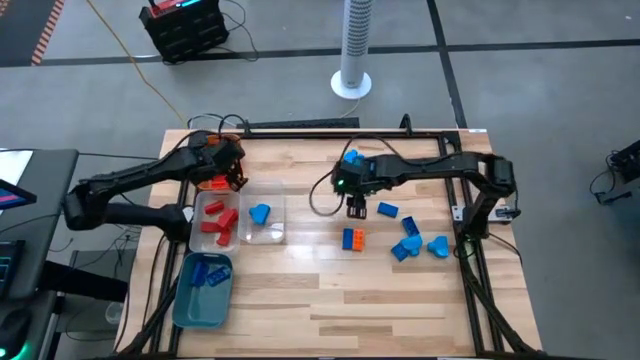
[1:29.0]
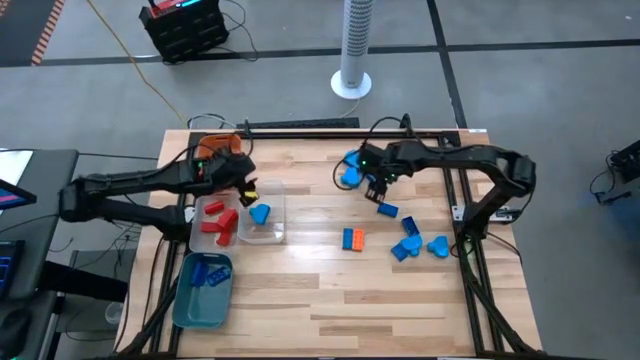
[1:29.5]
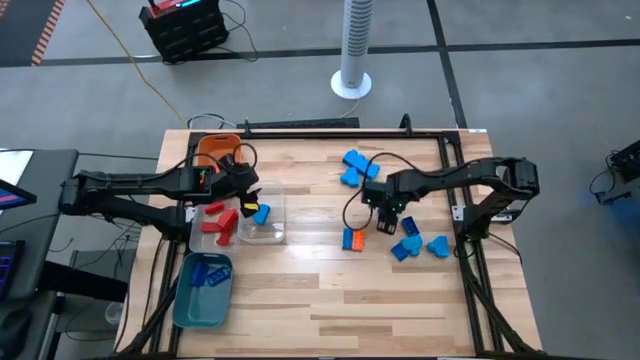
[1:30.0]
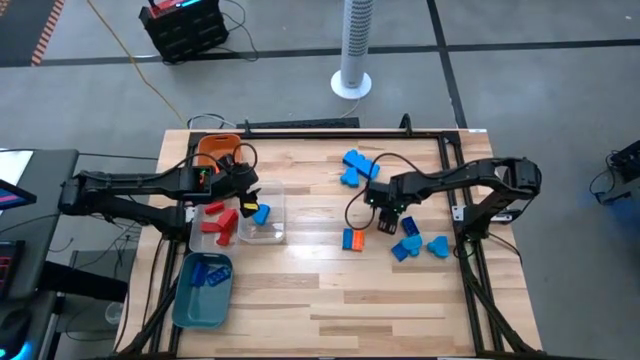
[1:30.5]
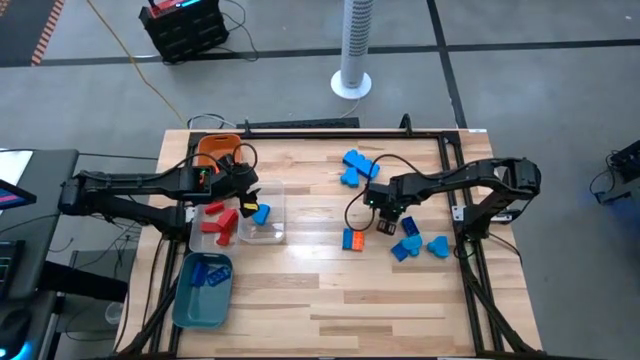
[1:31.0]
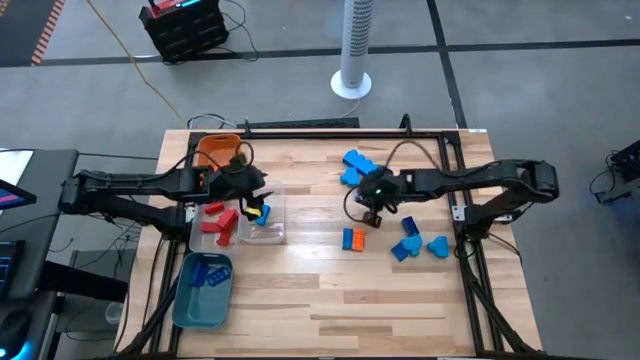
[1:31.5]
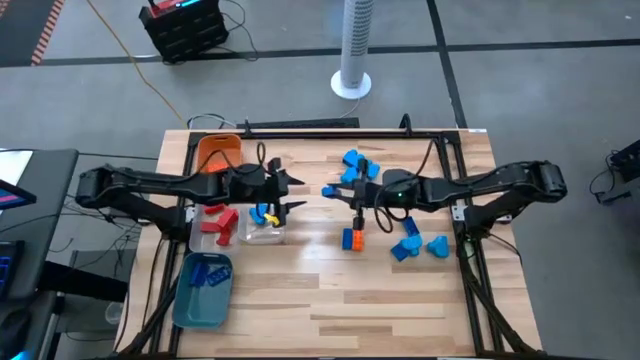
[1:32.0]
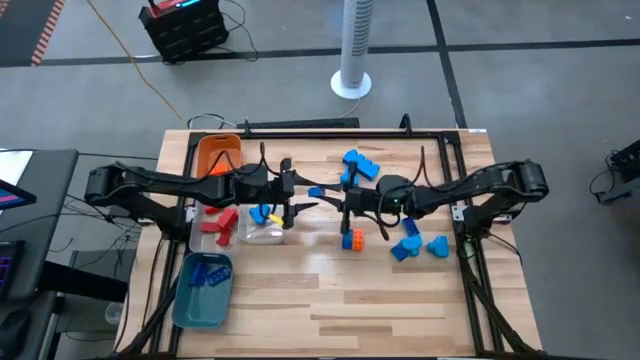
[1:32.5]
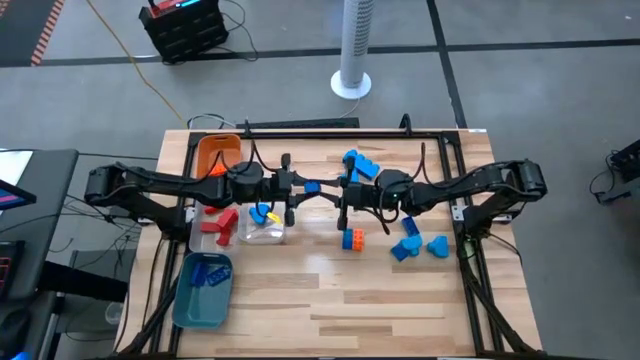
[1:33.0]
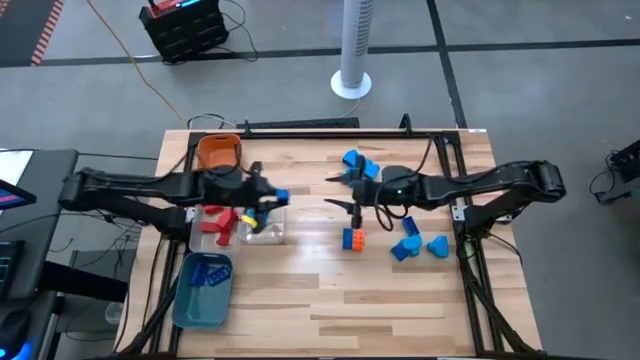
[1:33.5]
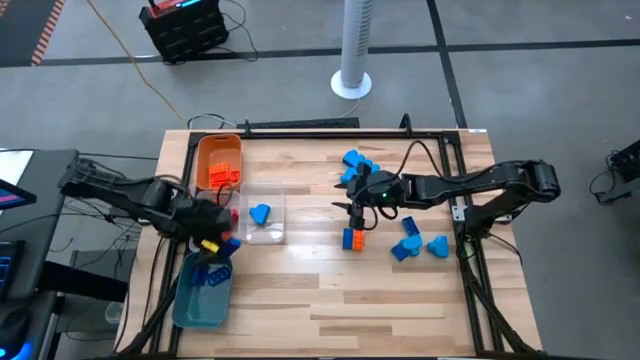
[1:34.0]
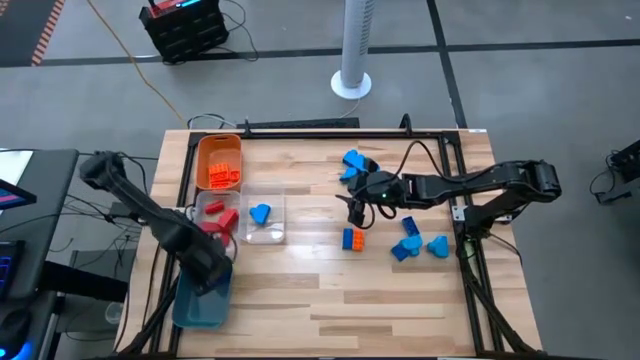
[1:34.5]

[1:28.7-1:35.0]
Task: Sort blocks
Put the blue game piece into the blue bin

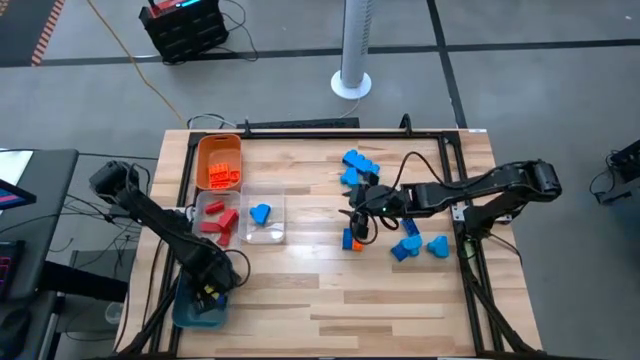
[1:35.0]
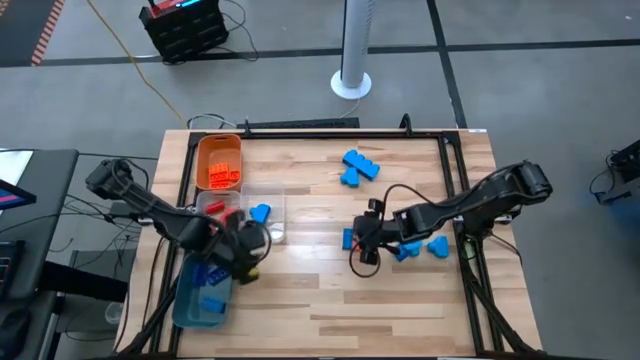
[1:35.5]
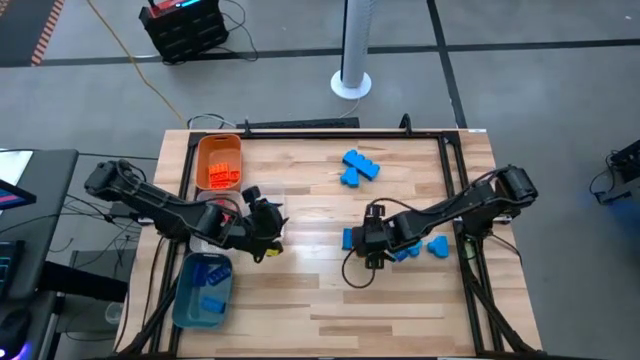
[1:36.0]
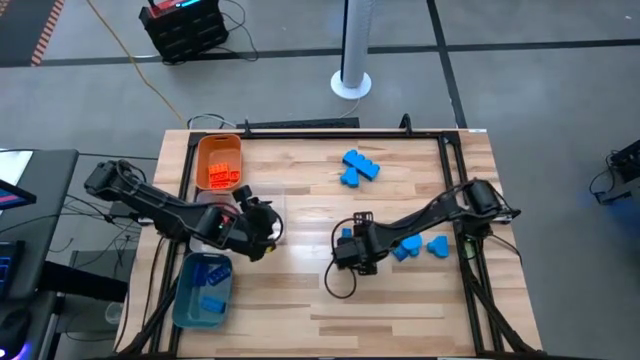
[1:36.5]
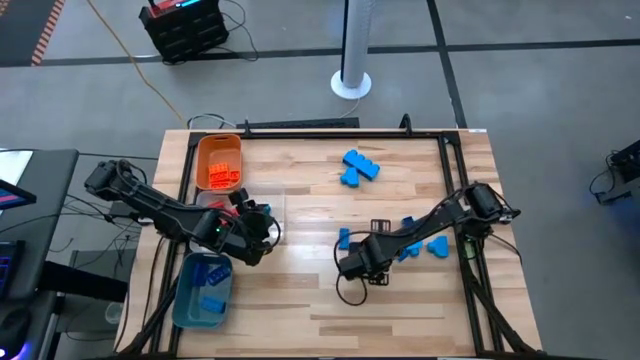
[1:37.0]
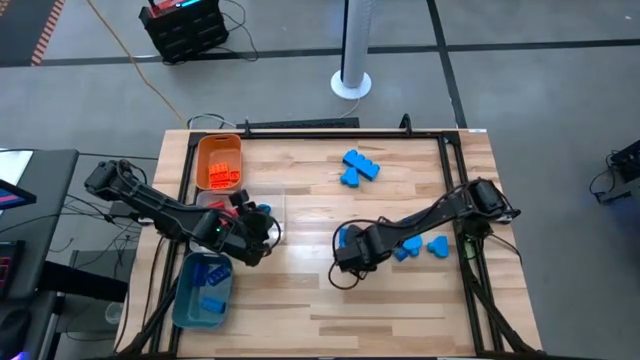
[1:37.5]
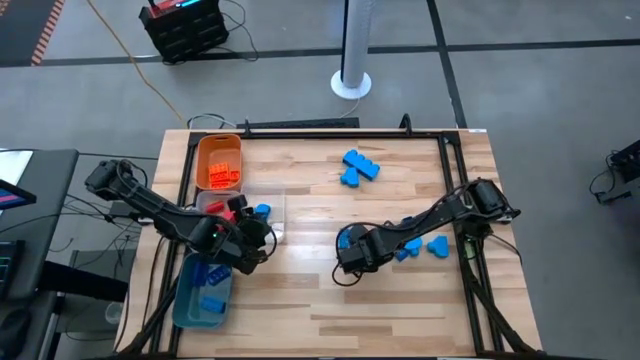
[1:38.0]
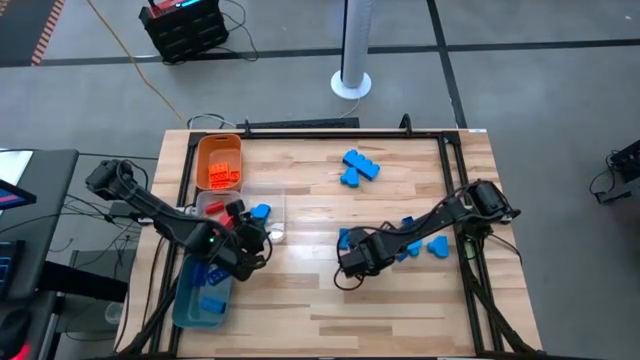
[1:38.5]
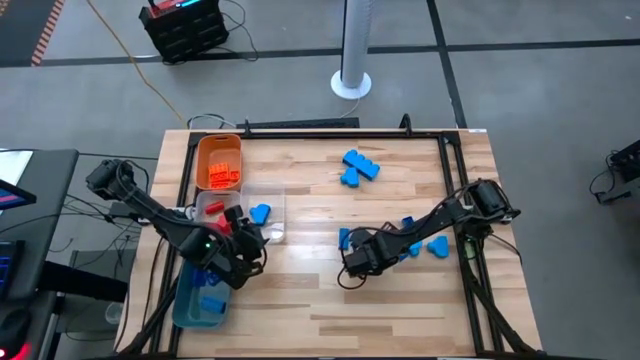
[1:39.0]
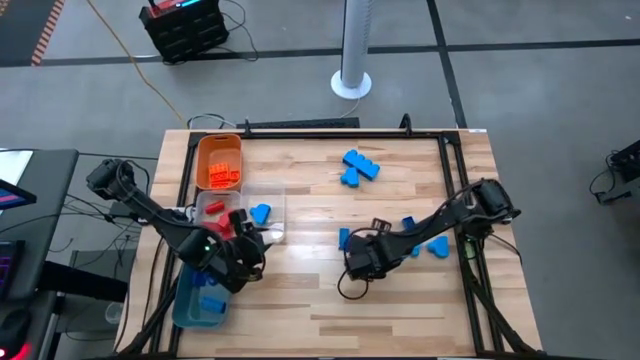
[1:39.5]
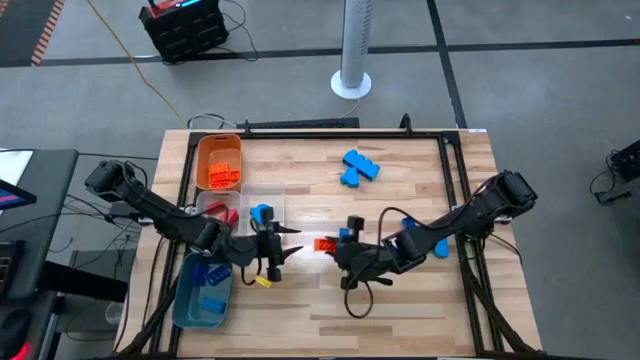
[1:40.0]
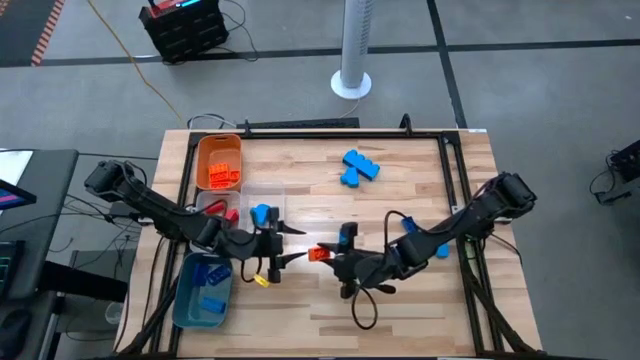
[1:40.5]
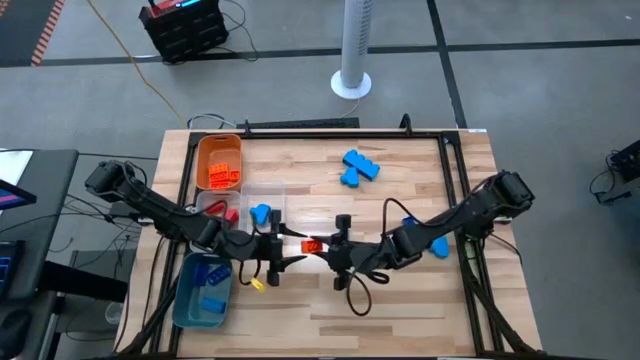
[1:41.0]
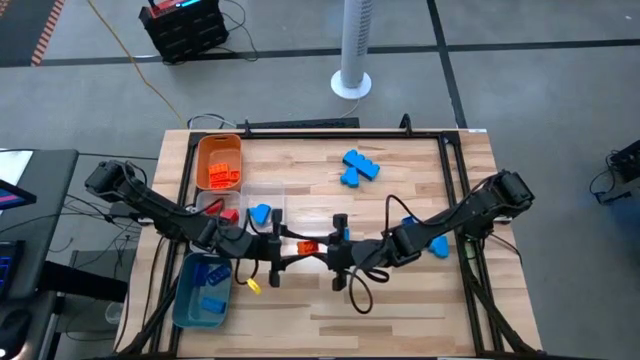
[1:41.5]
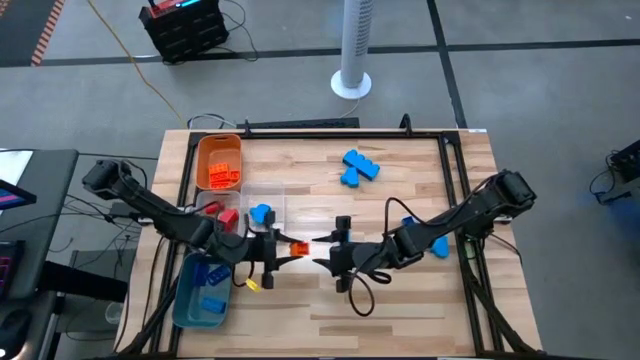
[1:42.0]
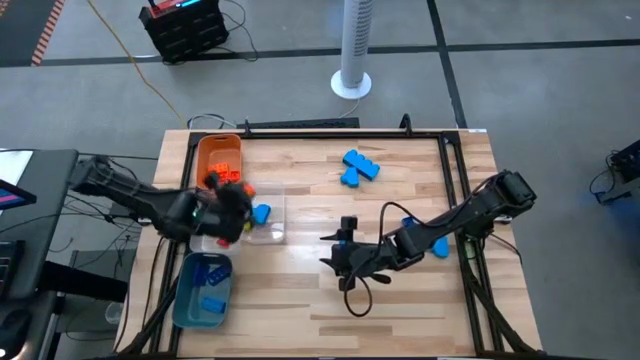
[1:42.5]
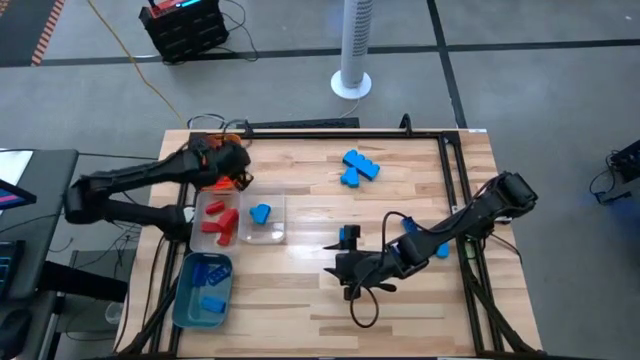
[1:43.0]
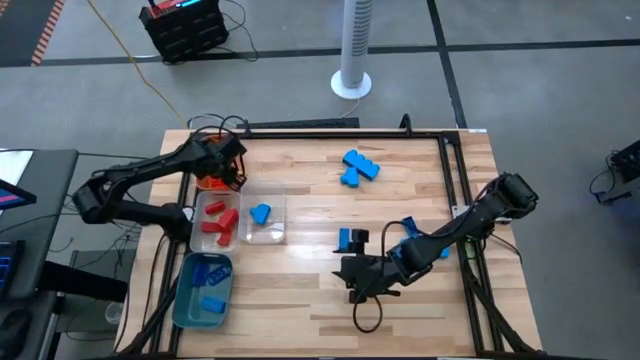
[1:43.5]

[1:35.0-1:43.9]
Put the orange game piece into the orange bin

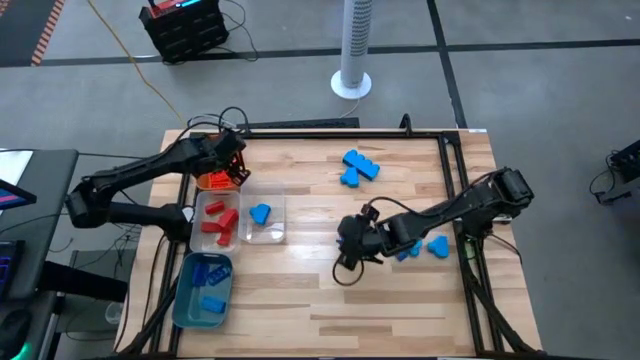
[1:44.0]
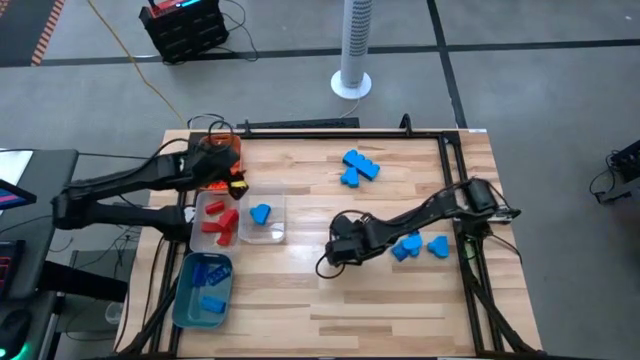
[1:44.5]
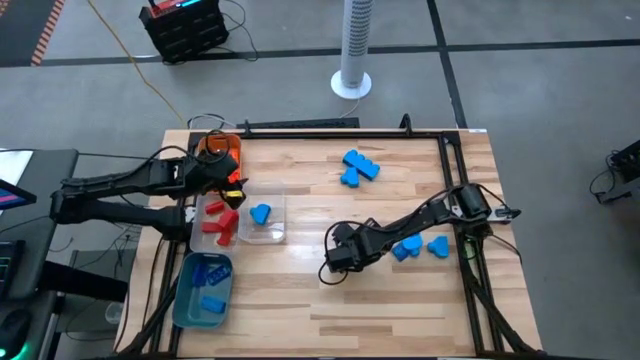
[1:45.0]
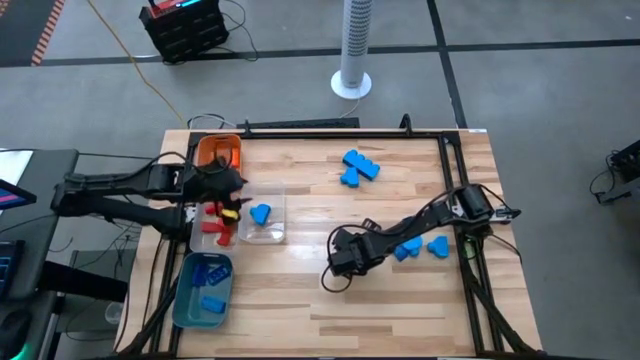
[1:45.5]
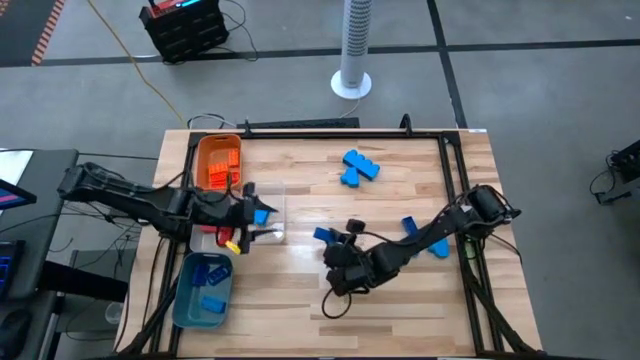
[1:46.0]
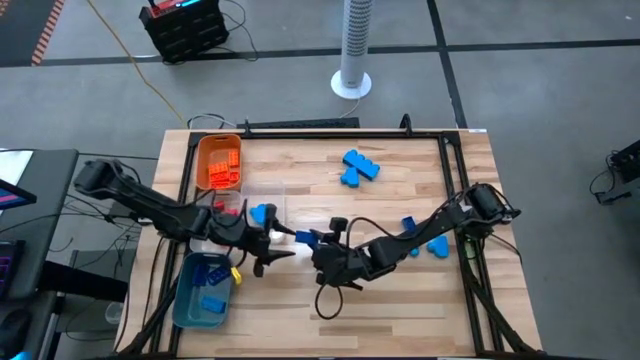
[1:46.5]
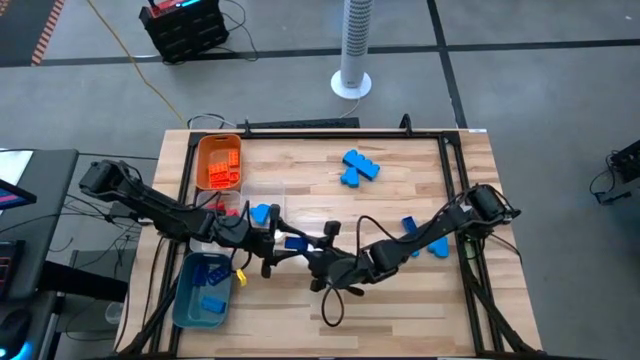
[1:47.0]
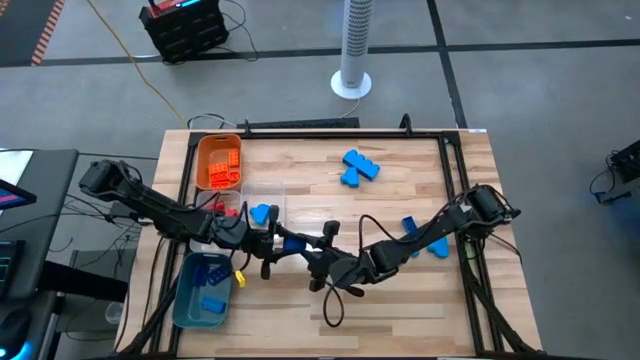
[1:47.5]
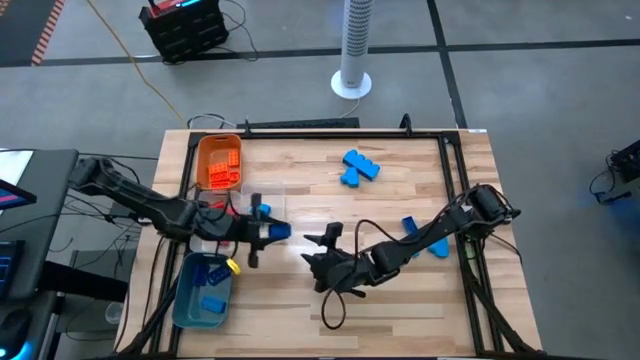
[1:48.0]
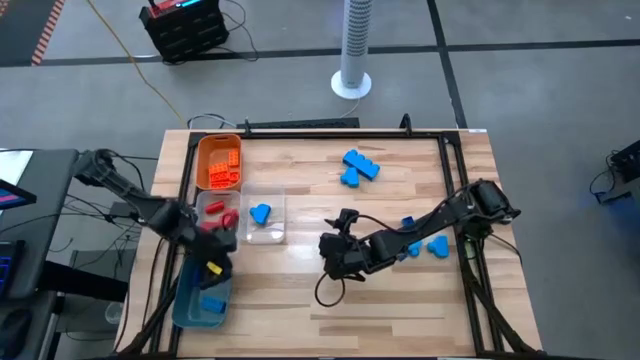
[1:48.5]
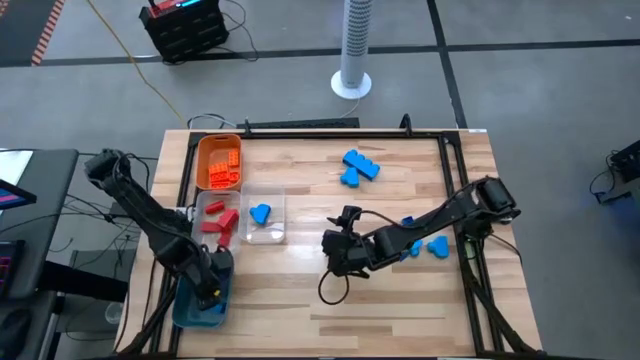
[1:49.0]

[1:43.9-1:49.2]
Put the blue game piece into the blue bin
